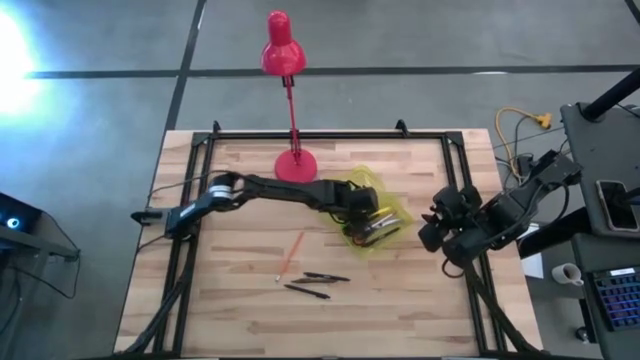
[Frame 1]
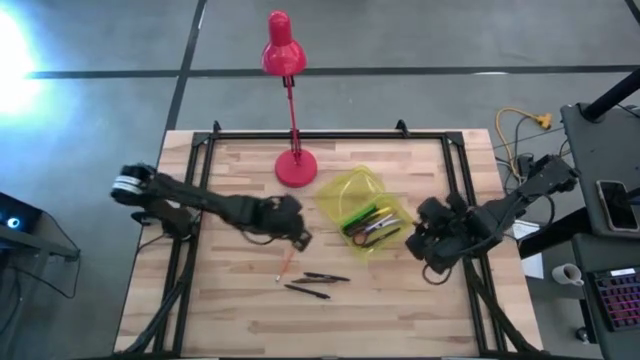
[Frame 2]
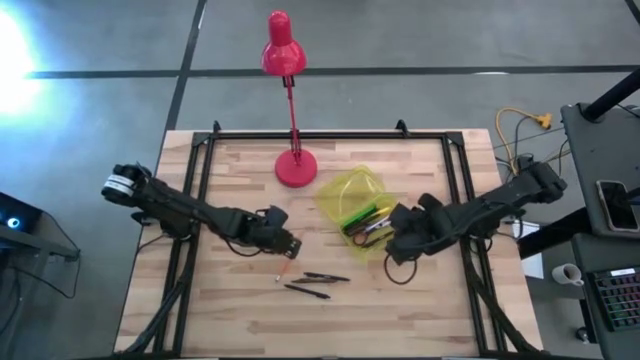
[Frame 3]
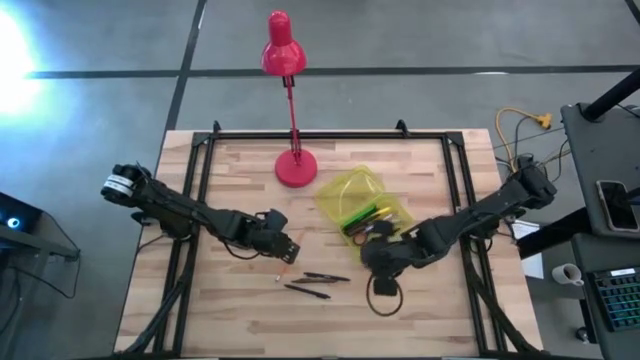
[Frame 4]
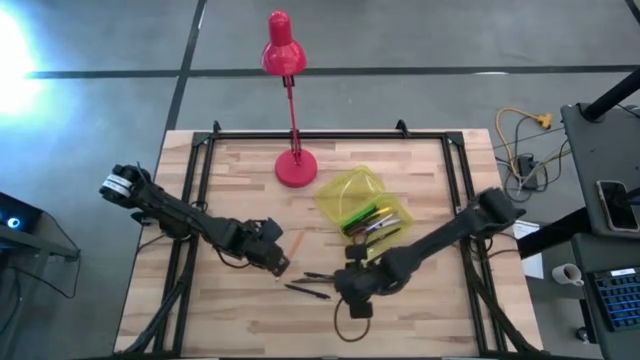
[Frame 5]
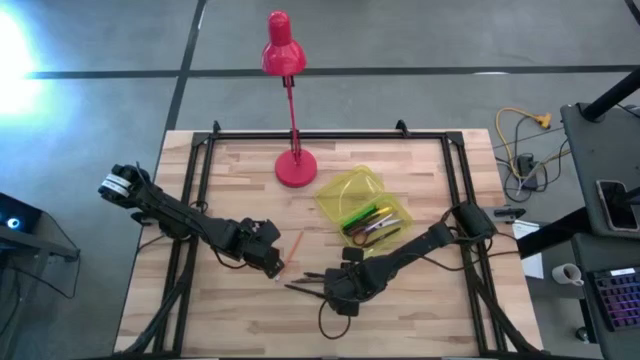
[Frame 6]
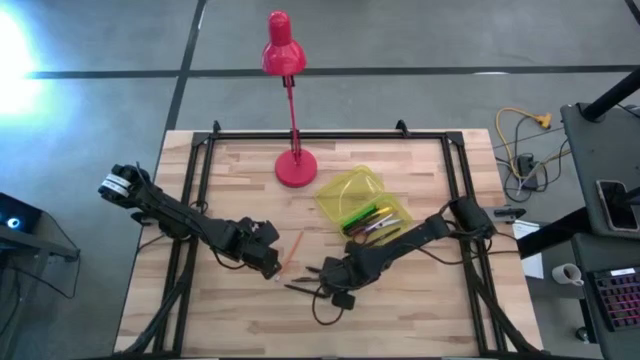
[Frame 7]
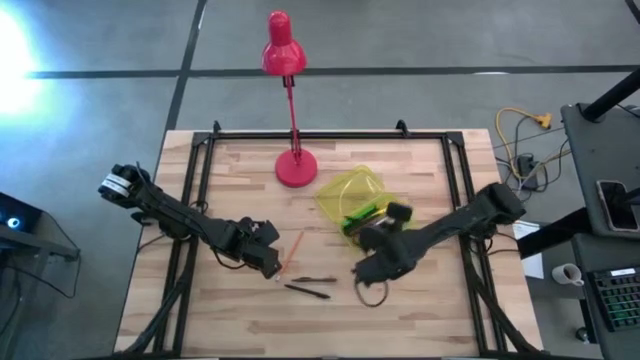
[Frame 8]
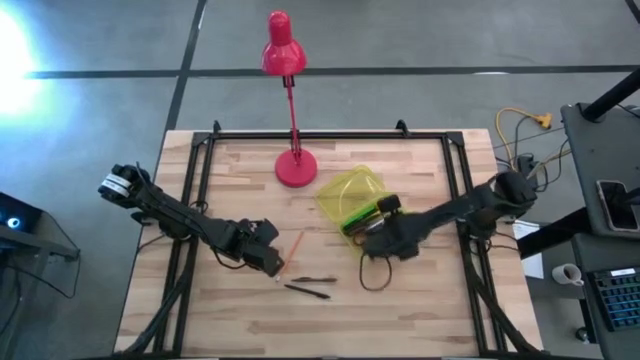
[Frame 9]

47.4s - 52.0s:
Task: Pick & place school supplies into a supply box
Put the black pen into the yellow supply box

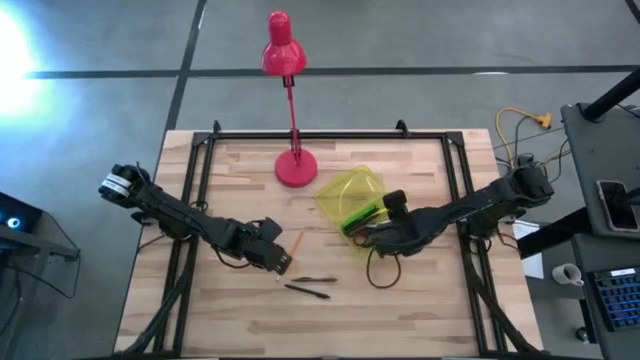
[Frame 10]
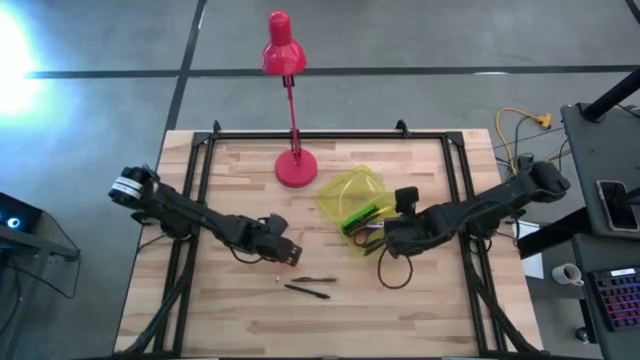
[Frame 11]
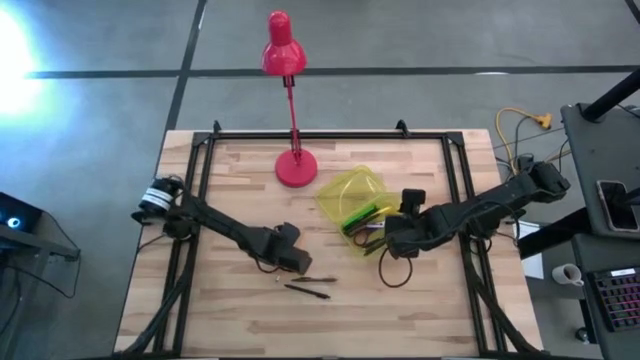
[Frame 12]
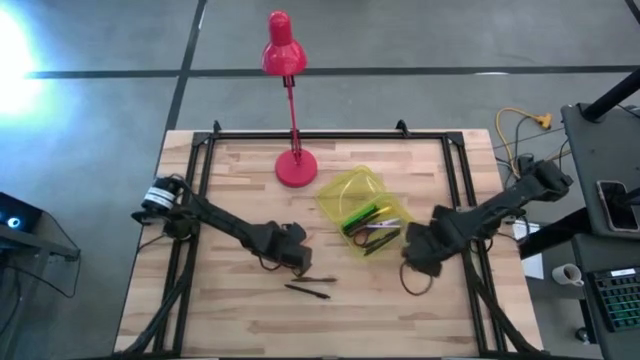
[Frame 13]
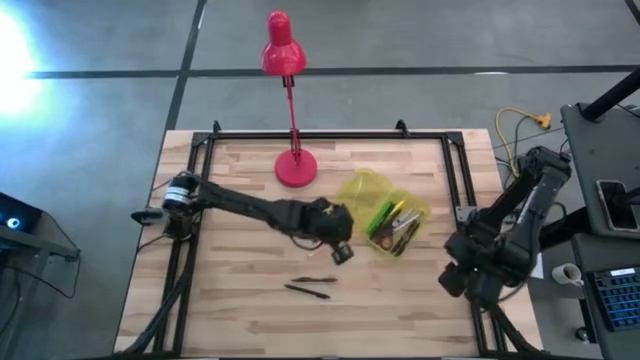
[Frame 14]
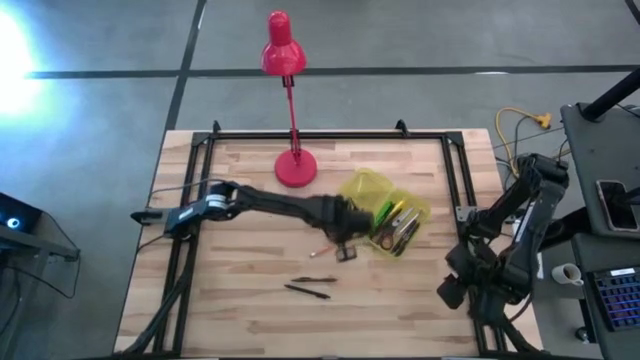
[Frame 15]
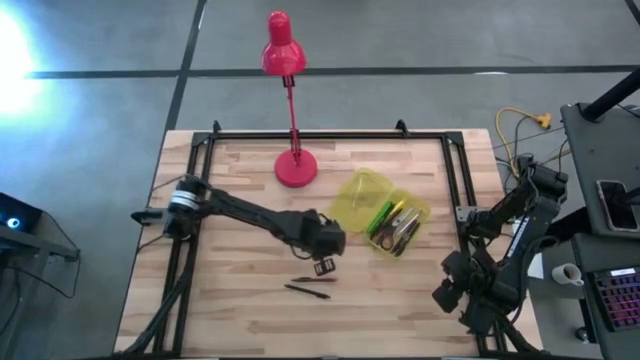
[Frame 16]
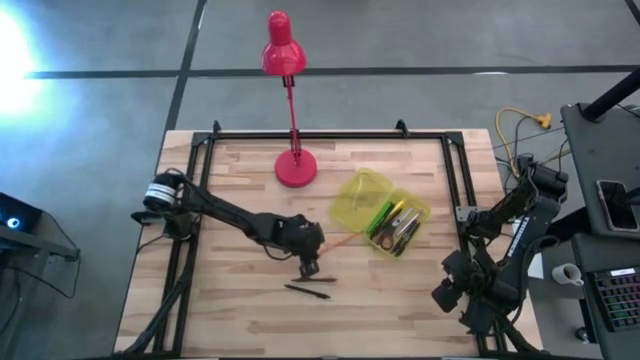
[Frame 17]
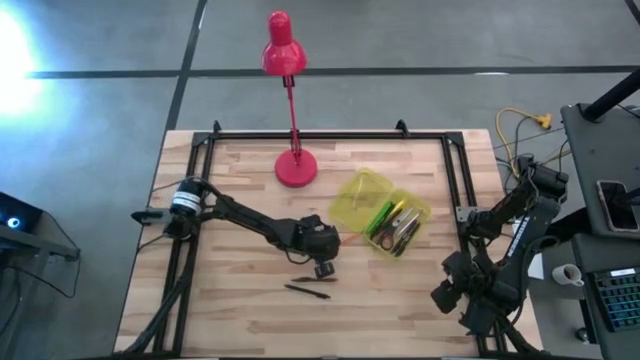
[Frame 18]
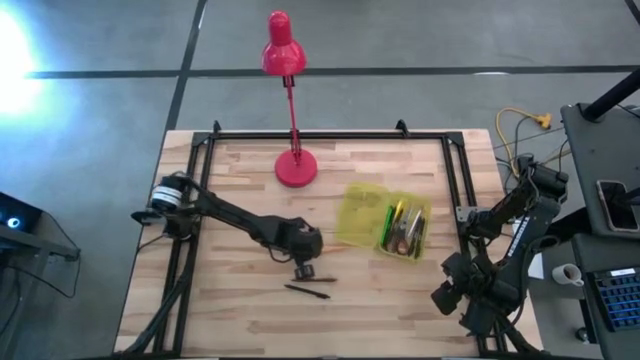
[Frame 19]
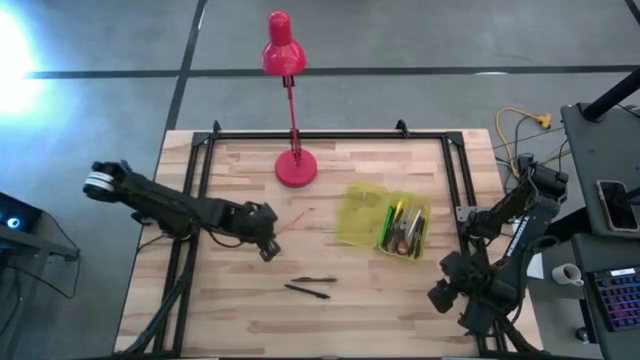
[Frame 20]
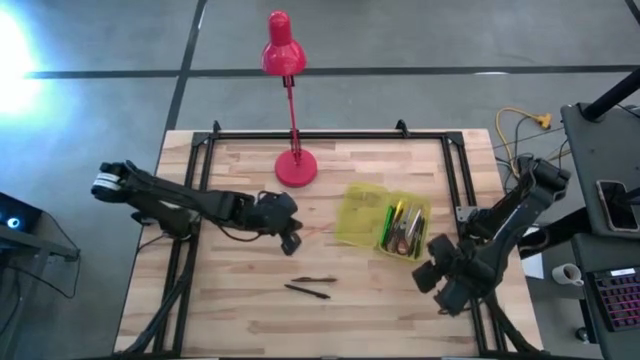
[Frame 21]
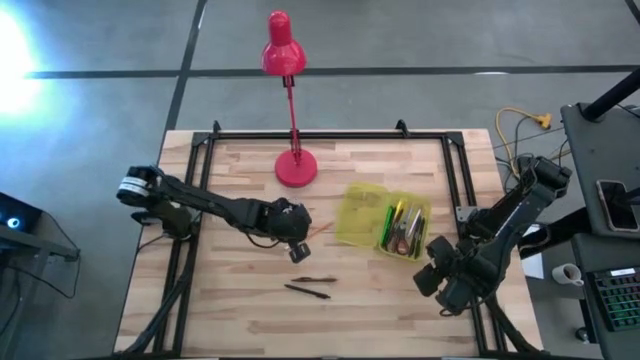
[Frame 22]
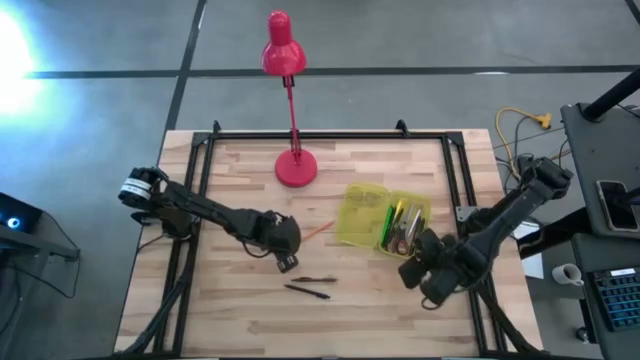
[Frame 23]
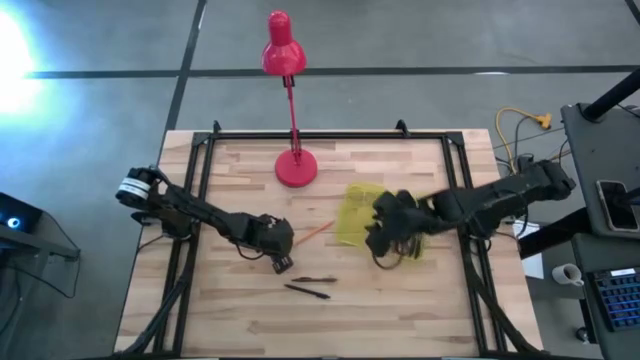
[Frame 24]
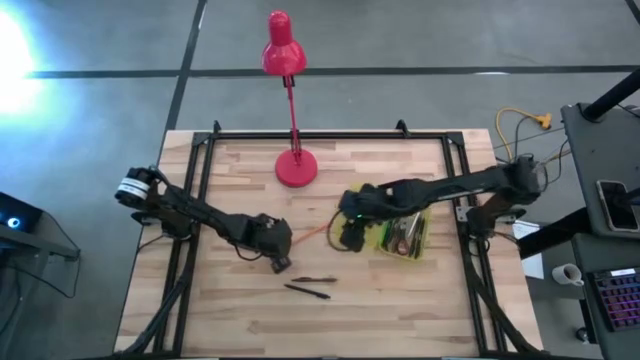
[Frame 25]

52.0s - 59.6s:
Put the orange pencil into the yellow supply box

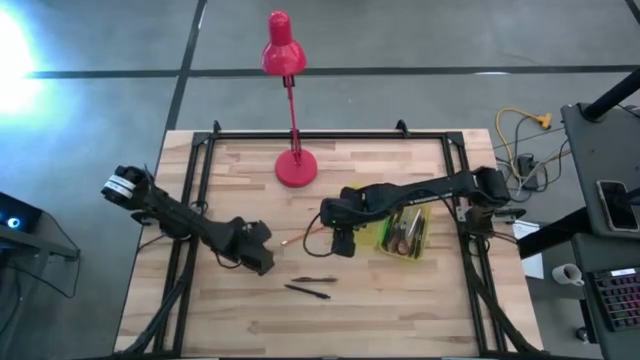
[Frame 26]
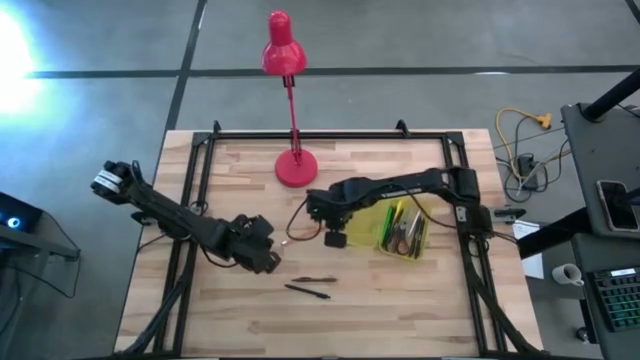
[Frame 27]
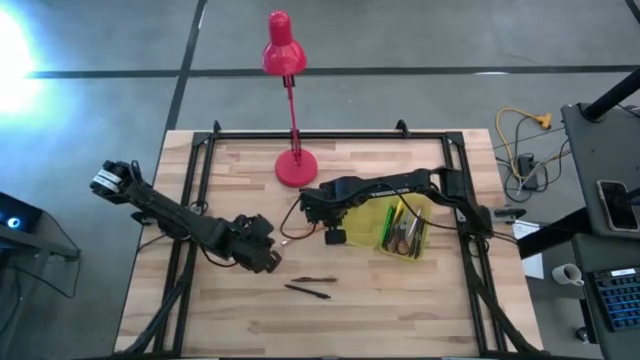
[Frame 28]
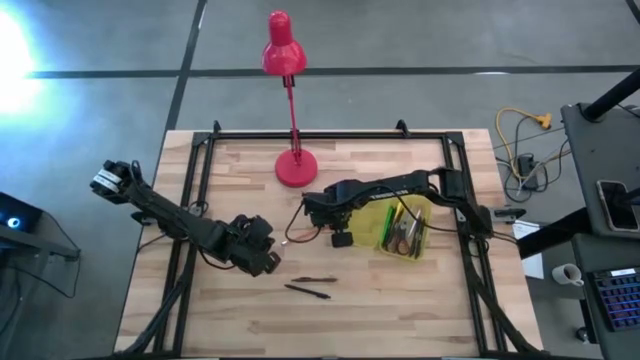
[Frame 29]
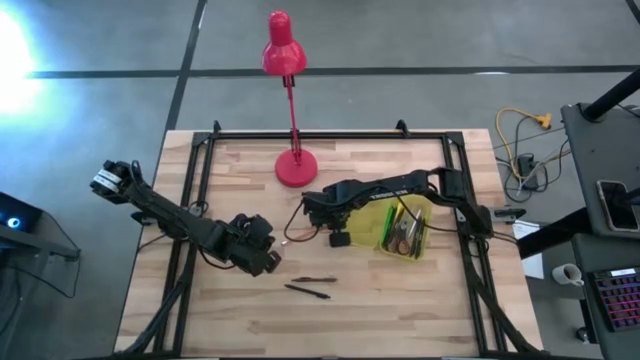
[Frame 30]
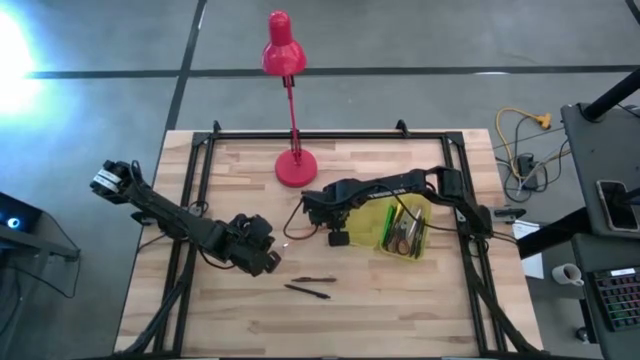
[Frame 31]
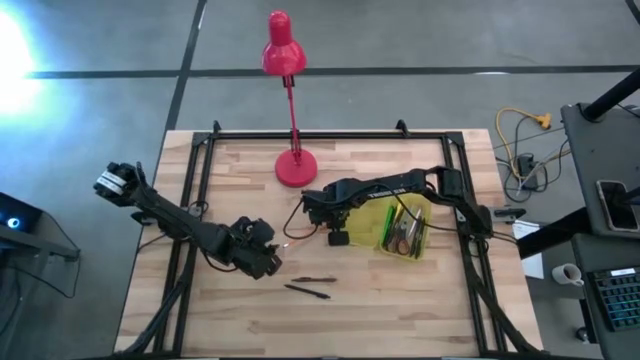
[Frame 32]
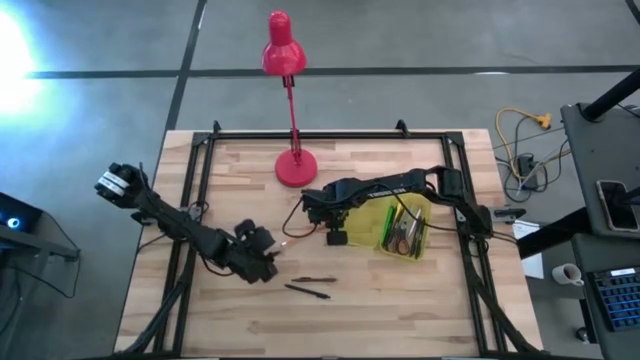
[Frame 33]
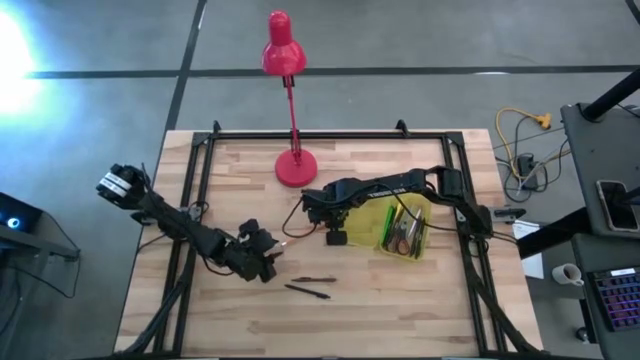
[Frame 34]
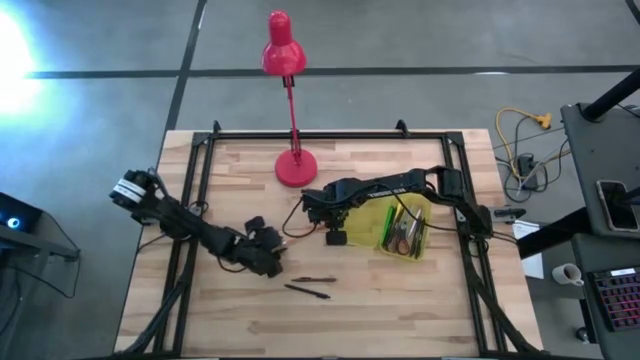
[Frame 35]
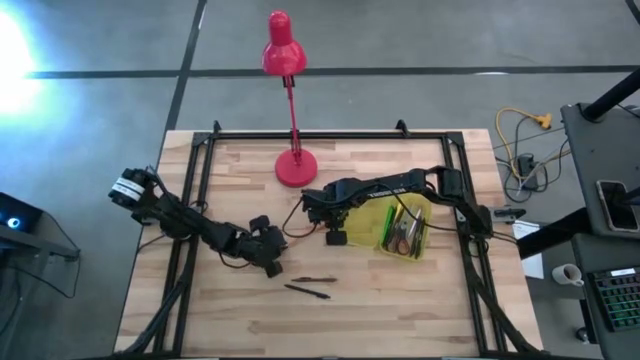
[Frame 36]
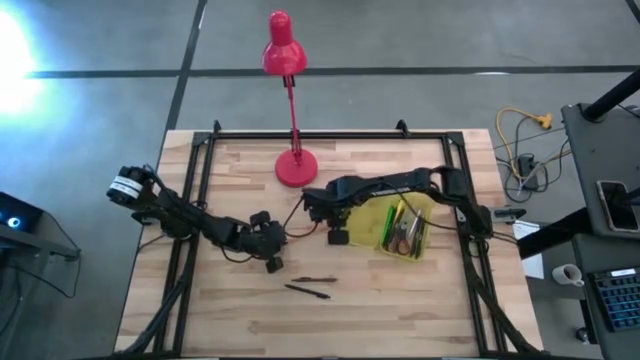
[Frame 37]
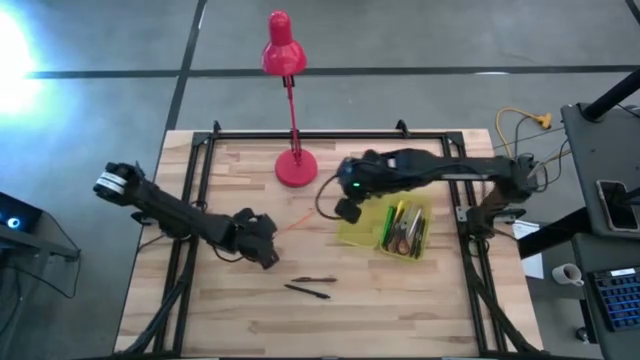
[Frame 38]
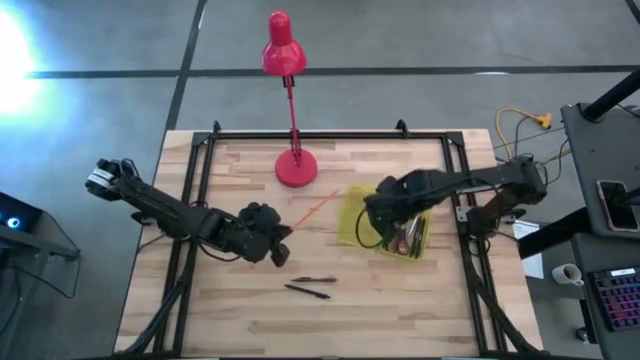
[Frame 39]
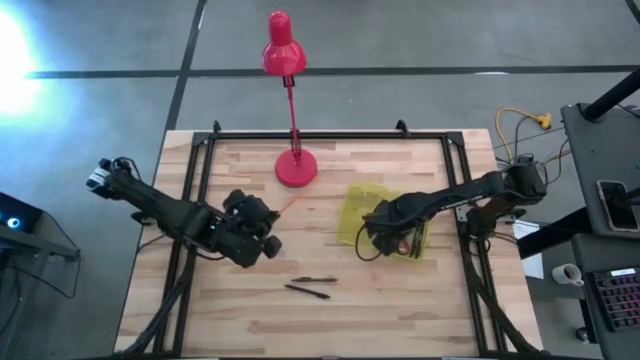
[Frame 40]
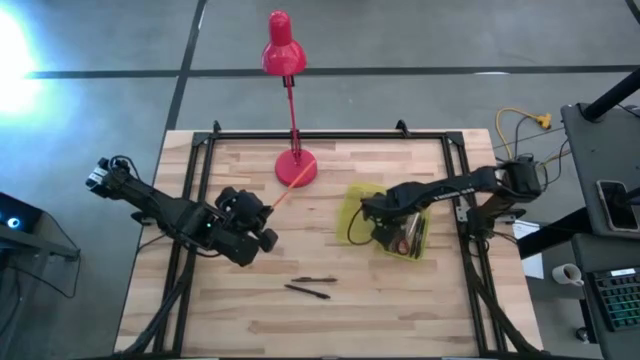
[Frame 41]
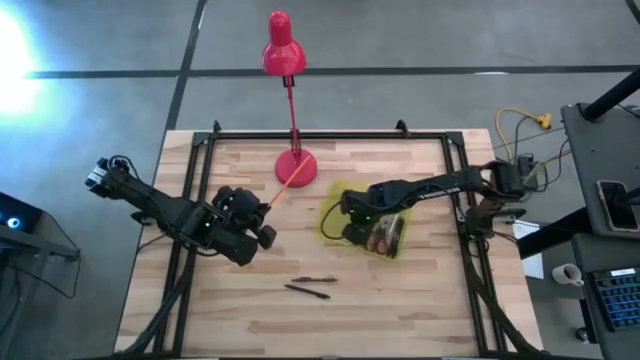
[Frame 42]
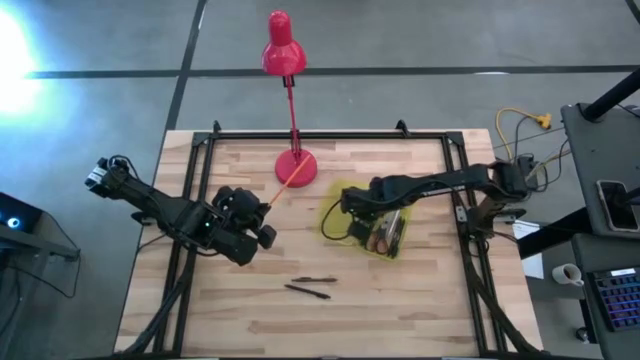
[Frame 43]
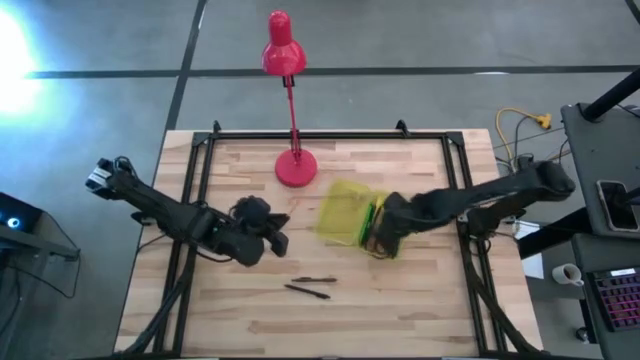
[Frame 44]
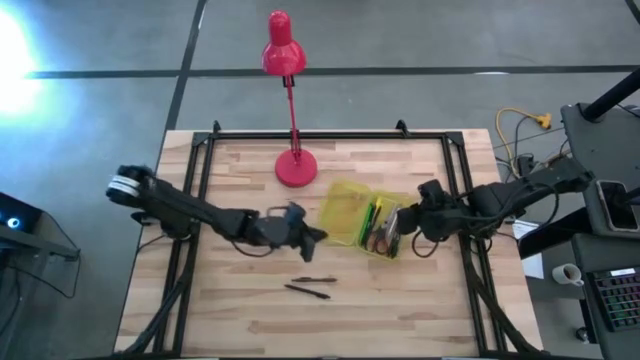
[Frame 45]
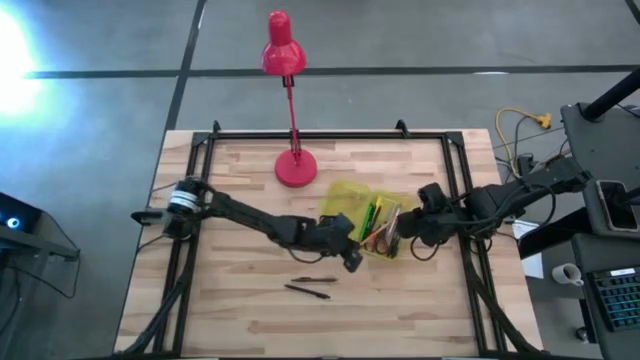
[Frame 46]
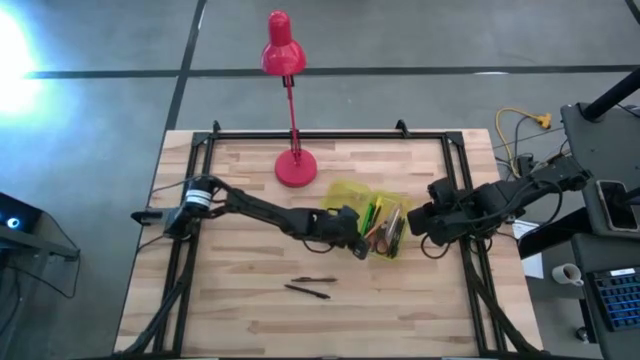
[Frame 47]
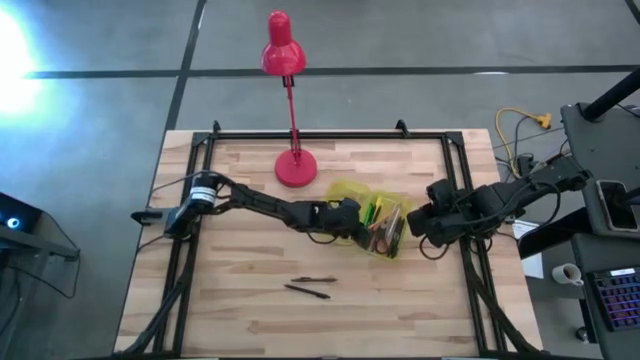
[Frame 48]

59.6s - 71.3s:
Put the orange pencil into the yellow supply box
